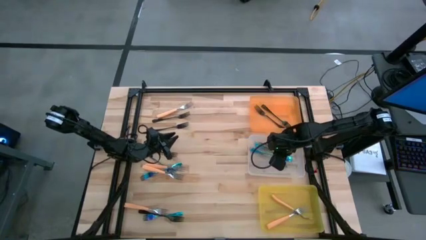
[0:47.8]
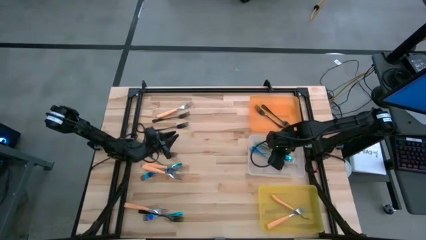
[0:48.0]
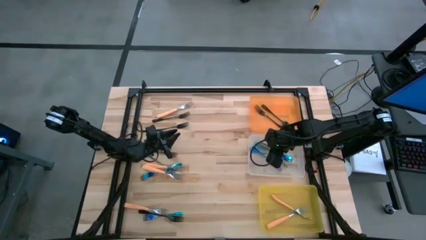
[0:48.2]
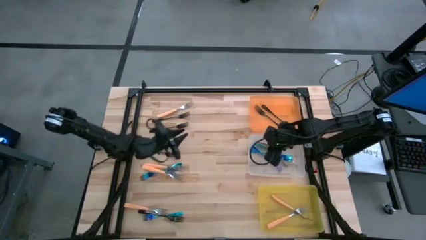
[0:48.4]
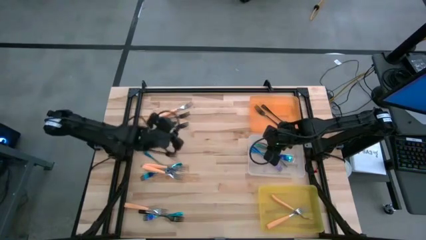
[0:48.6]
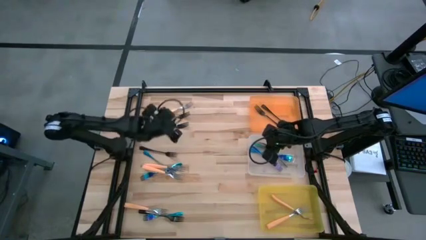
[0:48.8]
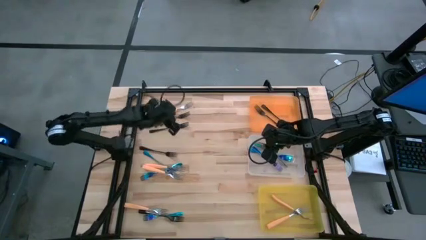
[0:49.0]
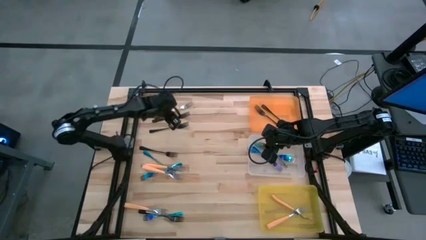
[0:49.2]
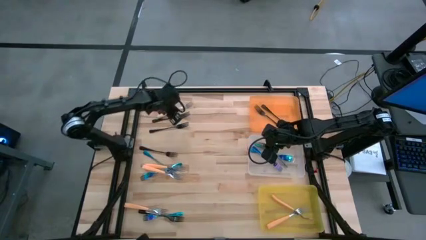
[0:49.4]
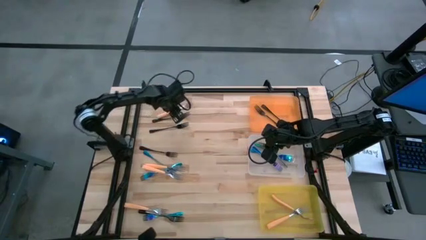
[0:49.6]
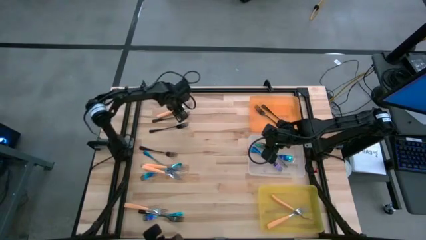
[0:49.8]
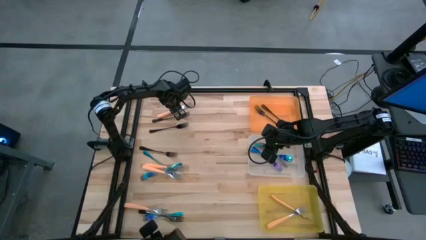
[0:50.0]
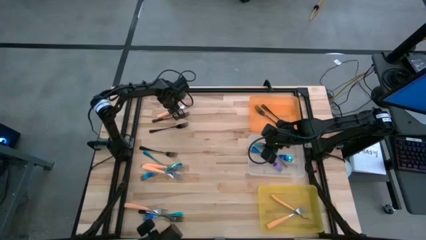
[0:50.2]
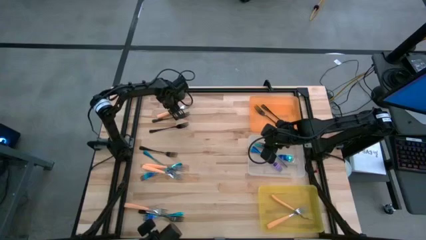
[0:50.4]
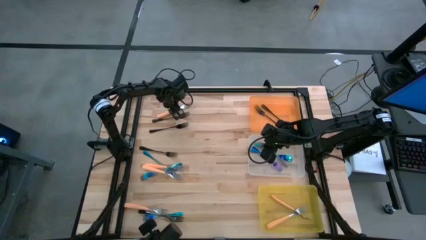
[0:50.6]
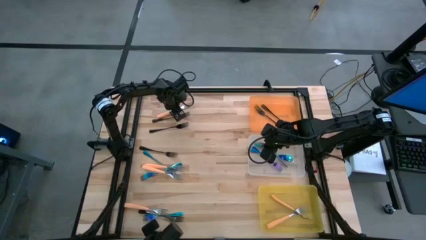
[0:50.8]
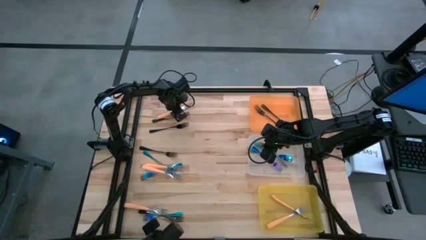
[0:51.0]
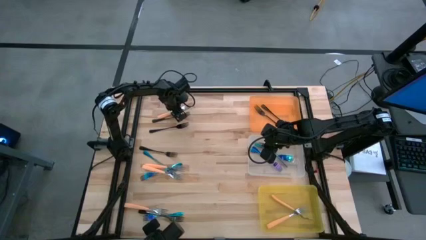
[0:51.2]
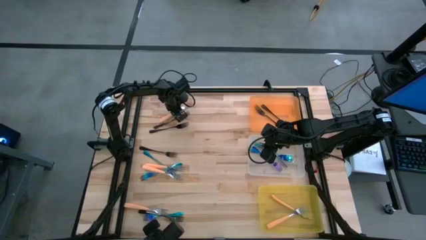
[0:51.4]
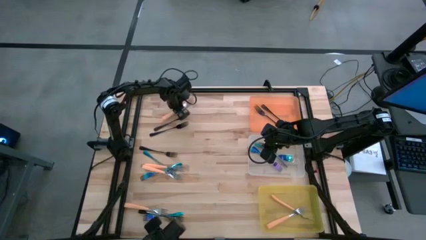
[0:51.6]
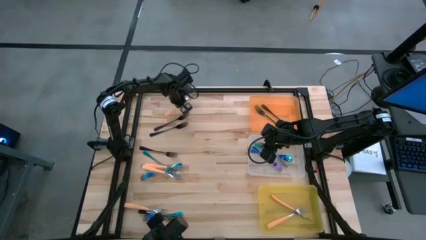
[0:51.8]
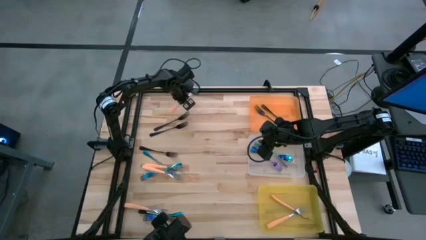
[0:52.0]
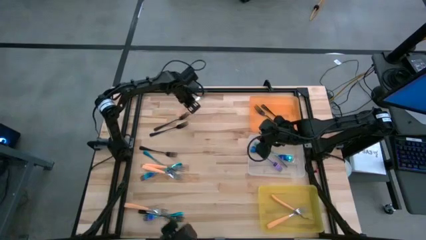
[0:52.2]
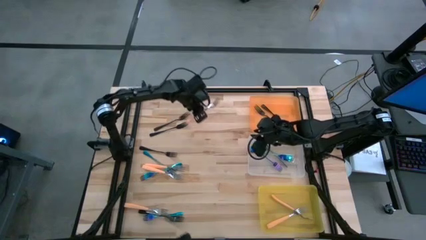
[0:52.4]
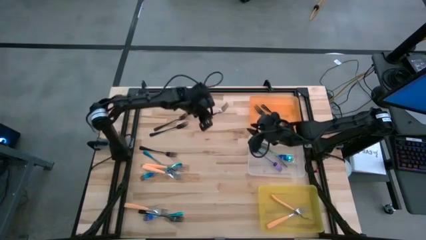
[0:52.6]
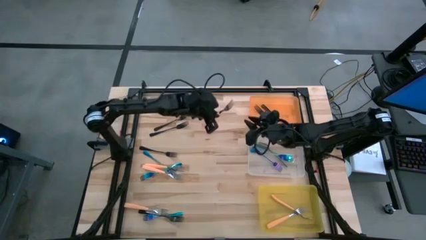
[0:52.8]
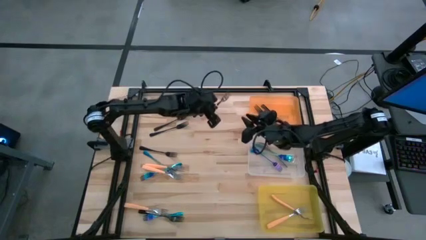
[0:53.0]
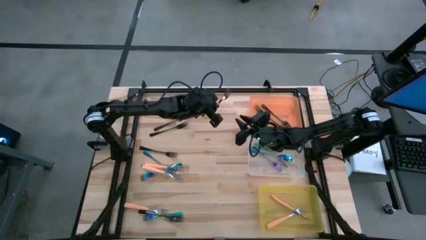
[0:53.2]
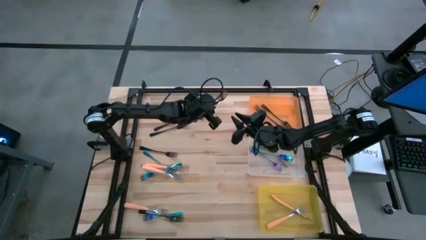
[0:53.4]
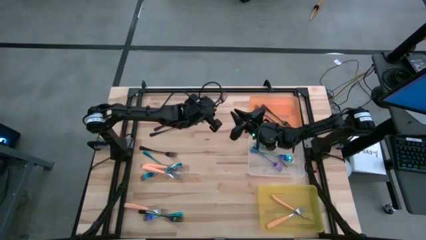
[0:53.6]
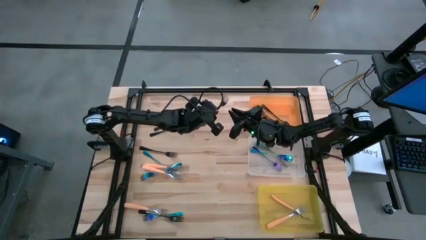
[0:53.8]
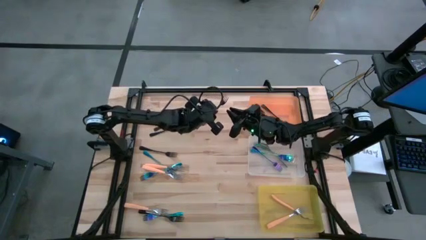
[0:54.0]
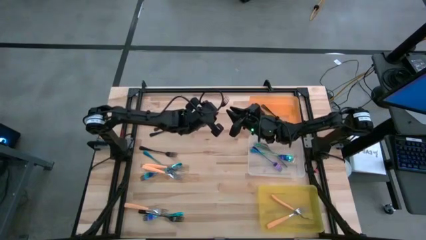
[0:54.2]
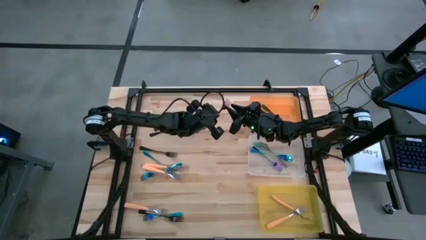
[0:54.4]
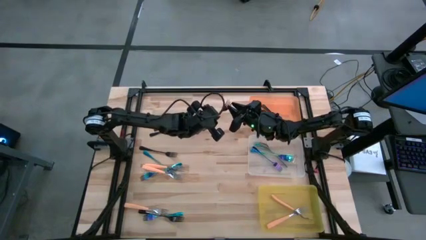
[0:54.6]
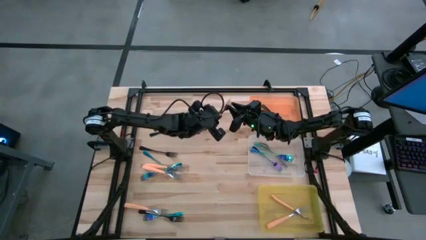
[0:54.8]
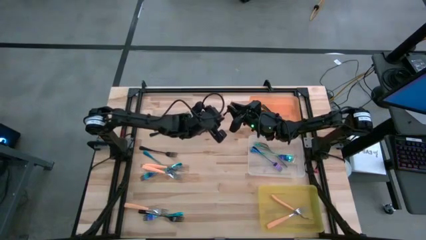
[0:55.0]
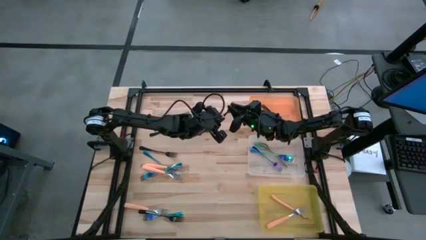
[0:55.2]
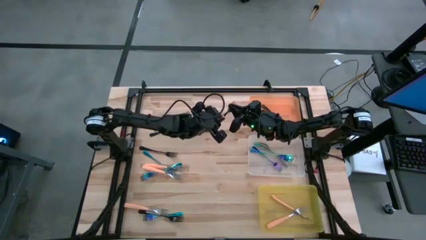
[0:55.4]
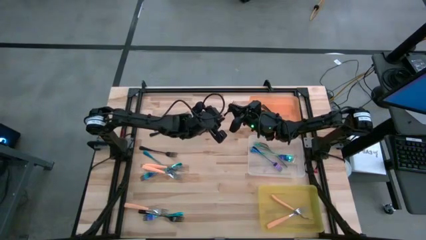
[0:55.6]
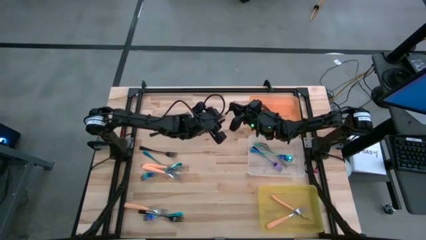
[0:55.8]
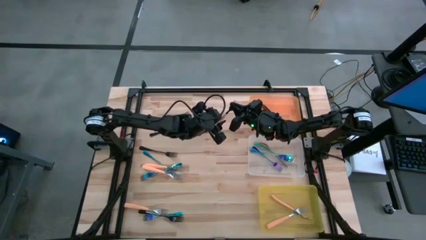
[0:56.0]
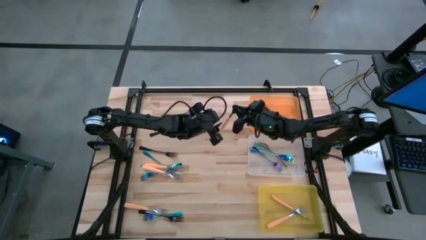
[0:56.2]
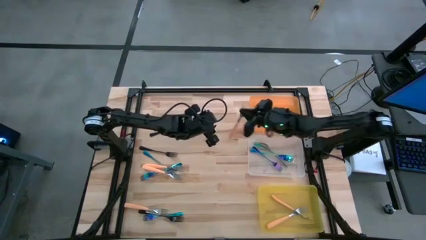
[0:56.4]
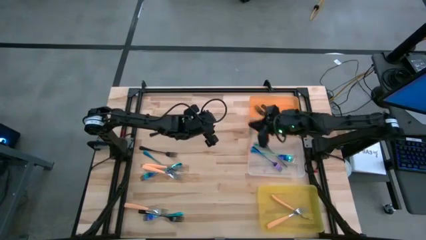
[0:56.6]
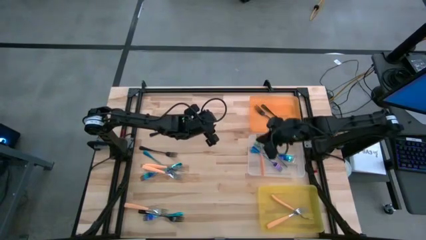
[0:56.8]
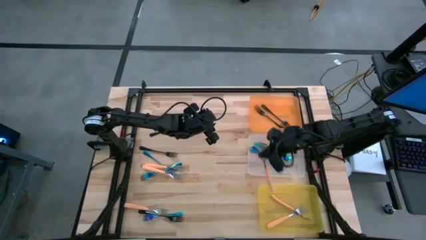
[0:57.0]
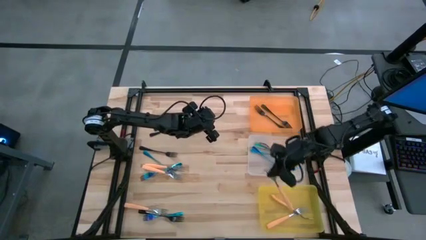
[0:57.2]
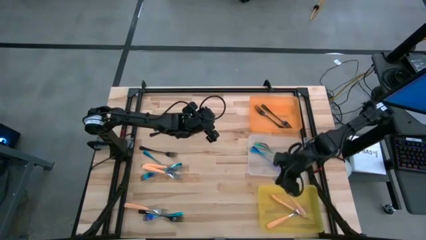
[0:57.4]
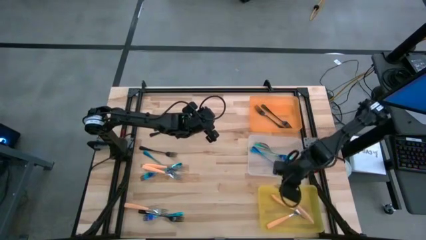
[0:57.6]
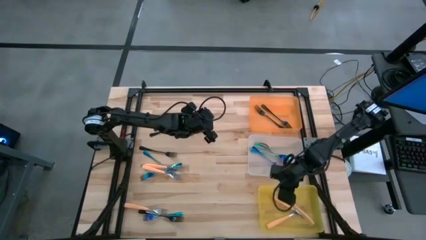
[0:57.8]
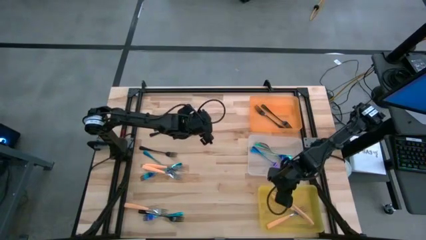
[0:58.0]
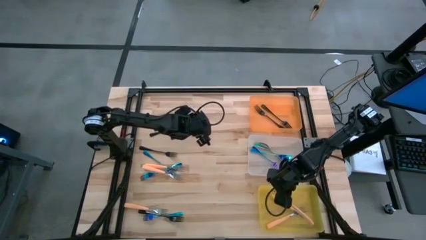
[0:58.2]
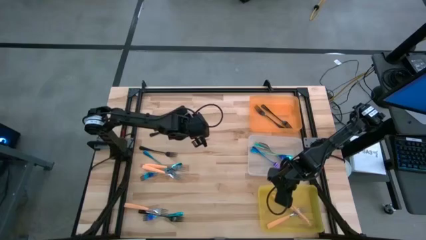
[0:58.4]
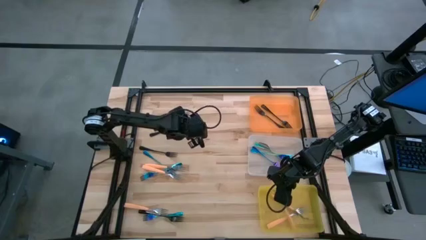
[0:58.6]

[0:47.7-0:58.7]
Task: Sort silverware by color (type)
Put the orange fork into the yellow bin

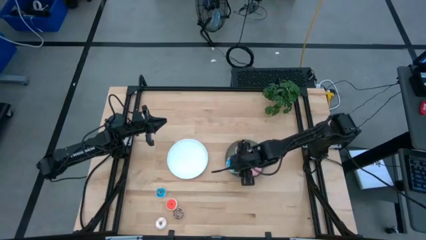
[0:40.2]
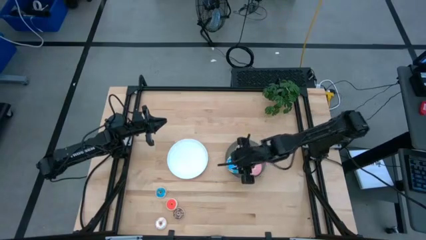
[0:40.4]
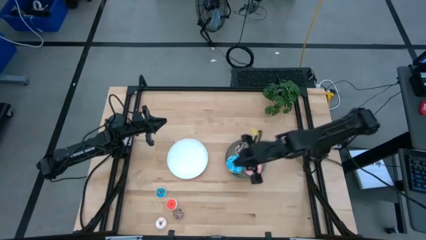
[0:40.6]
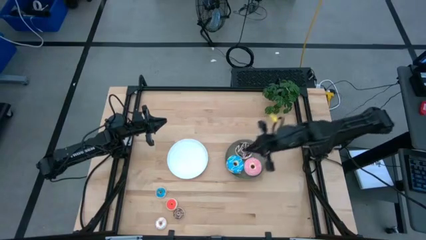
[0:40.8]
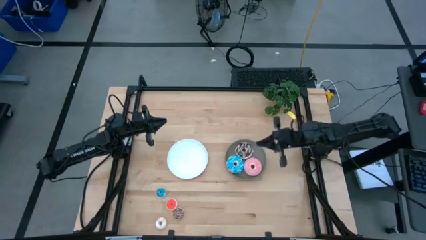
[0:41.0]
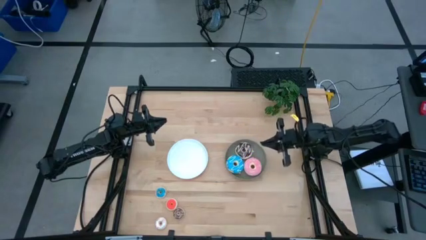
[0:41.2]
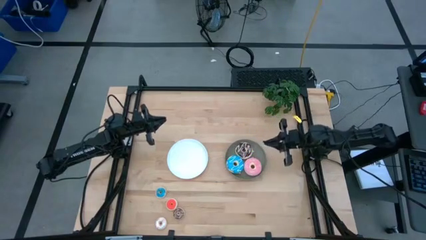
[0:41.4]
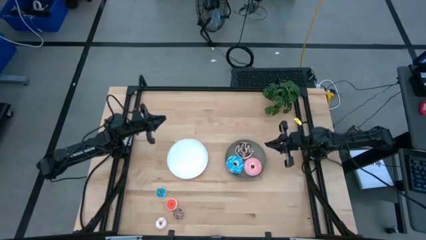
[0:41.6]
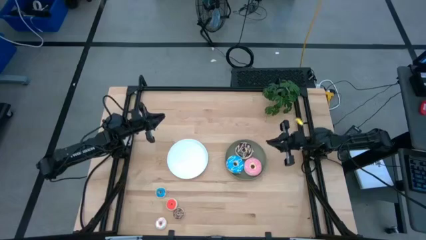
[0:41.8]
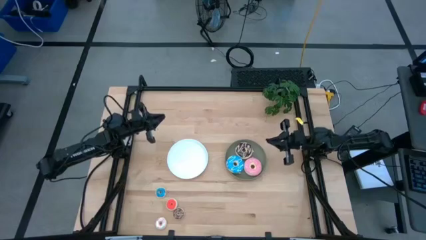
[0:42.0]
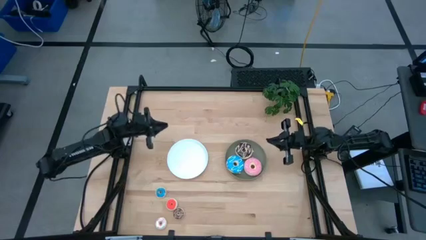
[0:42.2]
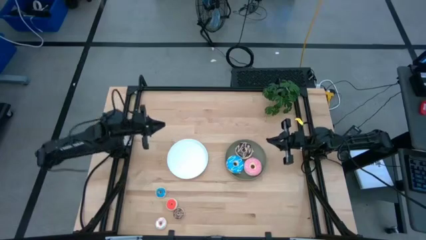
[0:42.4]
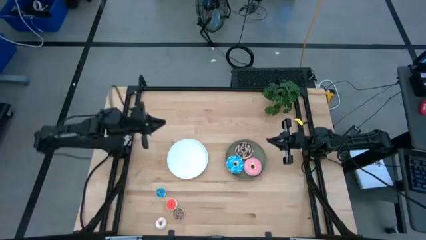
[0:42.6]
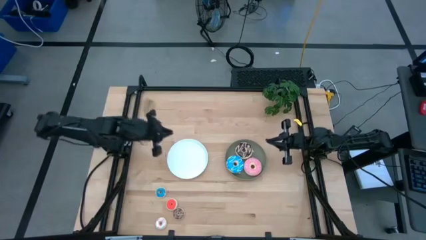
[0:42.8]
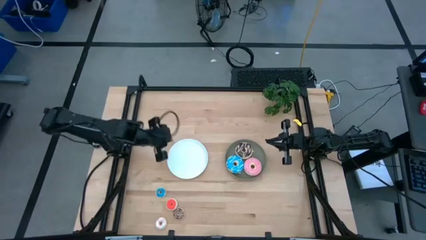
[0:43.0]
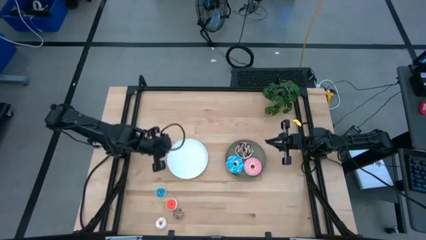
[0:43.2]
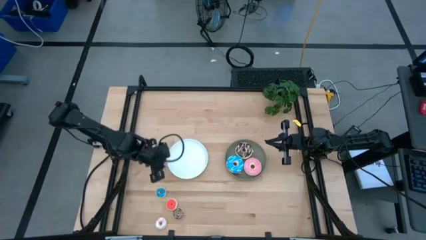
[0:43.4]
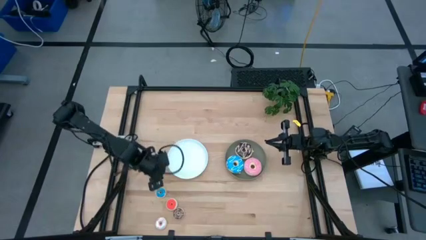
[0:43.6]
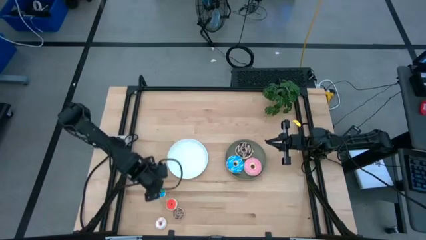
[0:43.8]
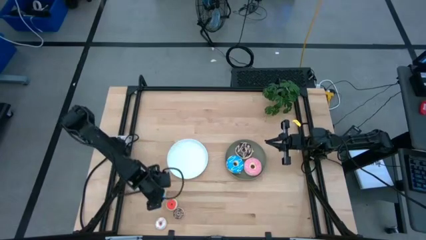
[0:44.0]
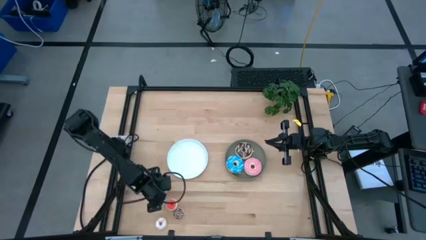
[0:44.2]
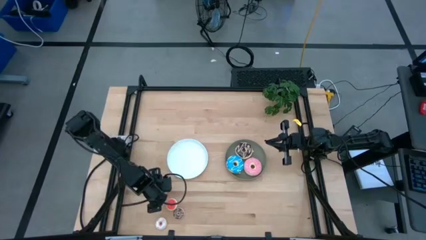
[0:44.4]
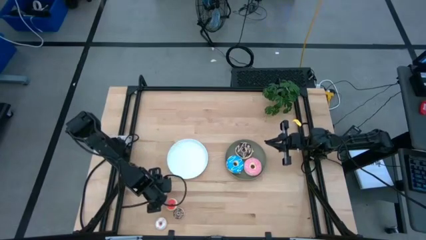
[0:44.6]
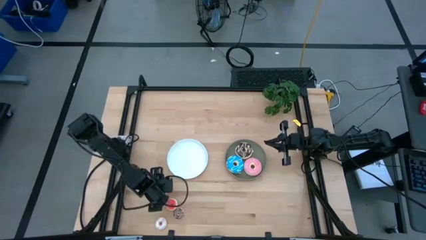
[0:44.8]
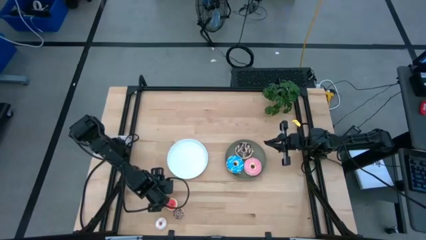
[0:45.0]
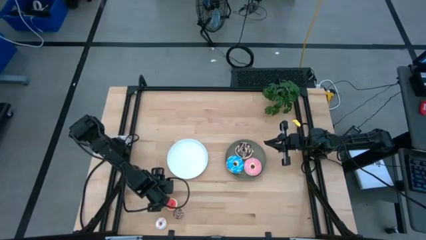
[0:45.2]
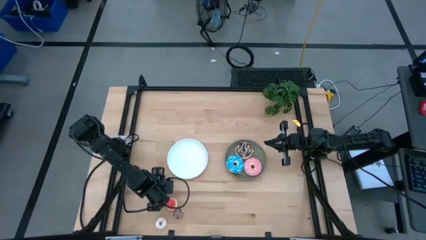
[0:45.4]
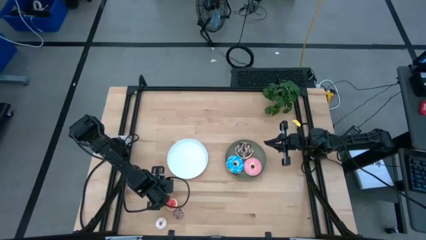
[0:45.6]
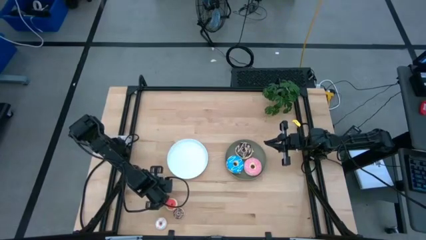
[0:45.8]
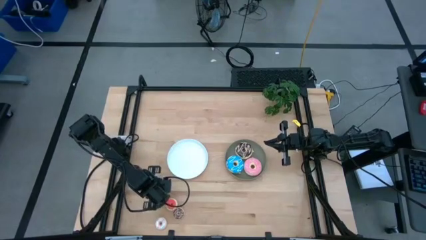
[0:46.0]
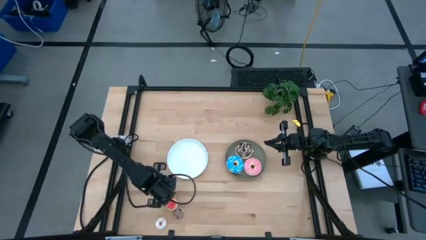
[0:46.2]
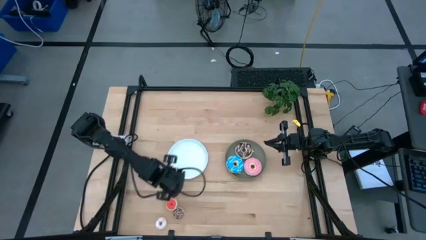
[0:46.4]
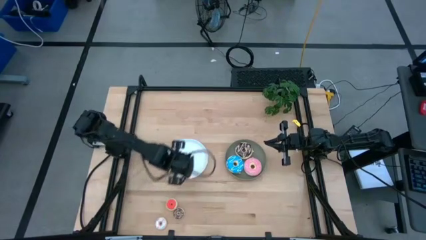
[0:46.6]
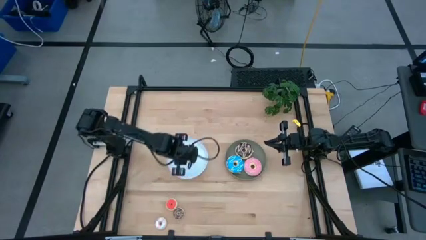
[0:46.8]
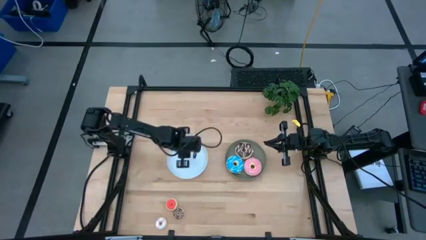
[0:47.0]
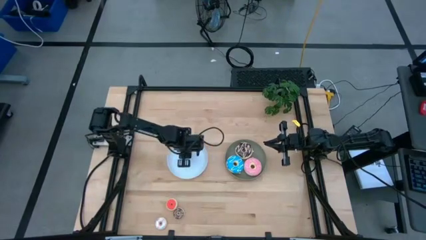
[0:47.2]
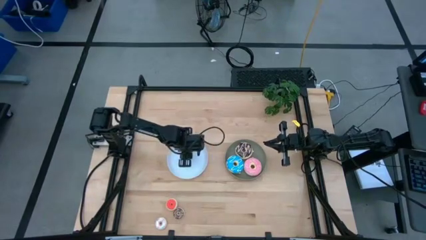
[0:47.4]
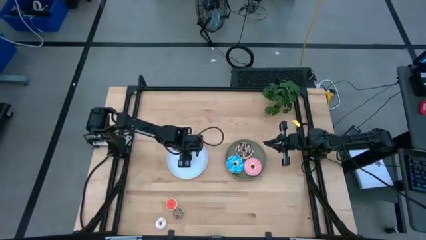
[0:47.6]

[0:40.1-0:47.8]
Task: Pick & Place donuts
Put the small blue donut on the white plate
